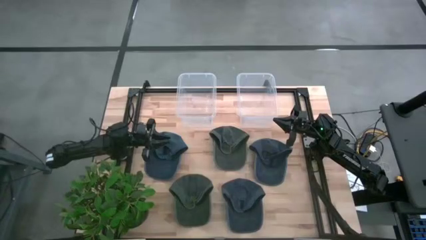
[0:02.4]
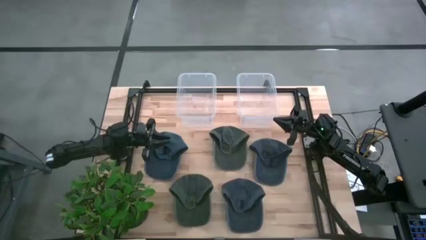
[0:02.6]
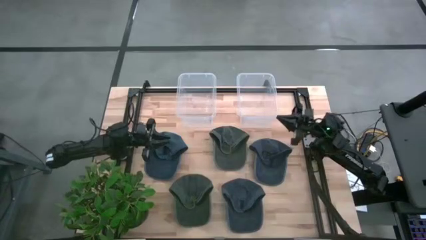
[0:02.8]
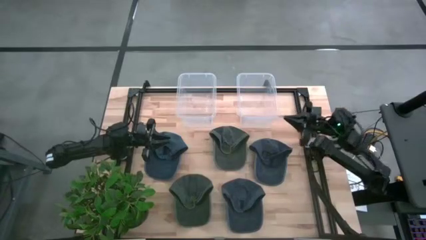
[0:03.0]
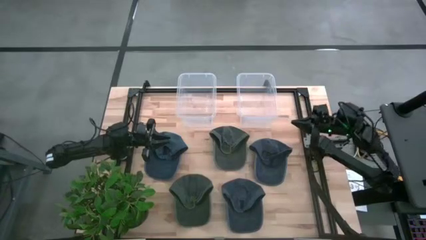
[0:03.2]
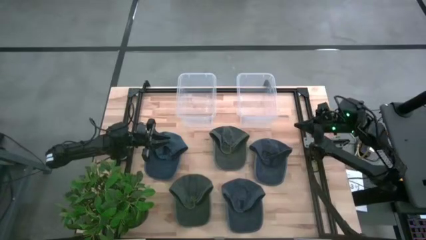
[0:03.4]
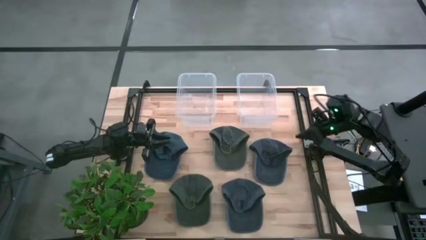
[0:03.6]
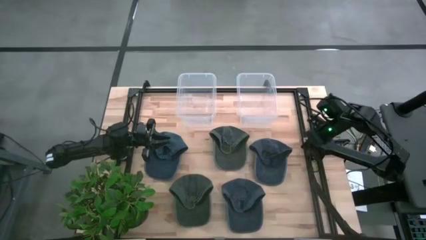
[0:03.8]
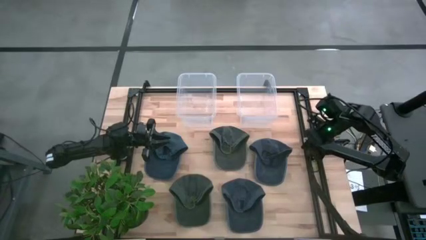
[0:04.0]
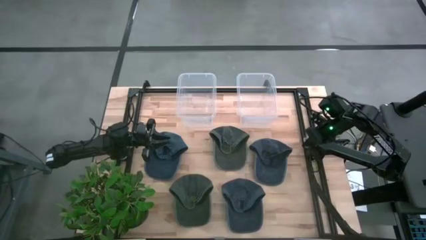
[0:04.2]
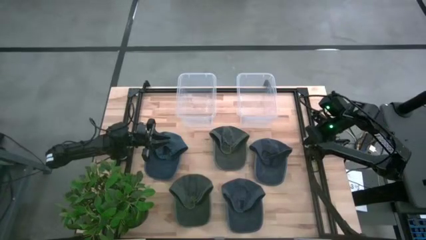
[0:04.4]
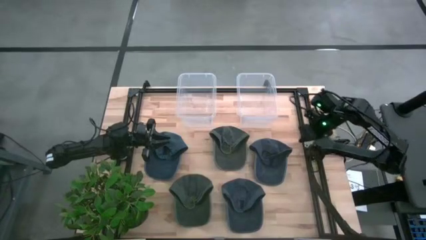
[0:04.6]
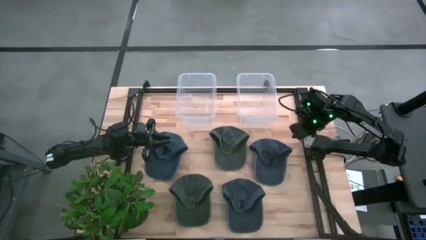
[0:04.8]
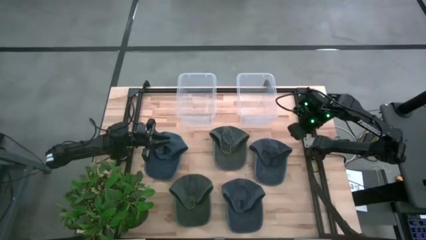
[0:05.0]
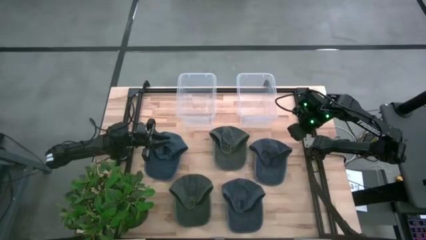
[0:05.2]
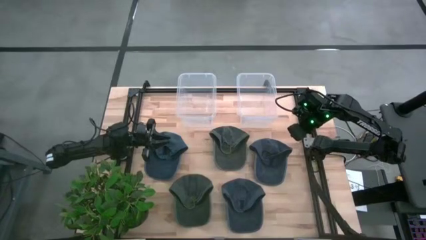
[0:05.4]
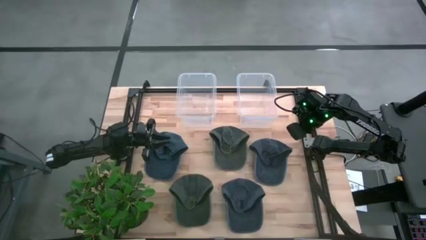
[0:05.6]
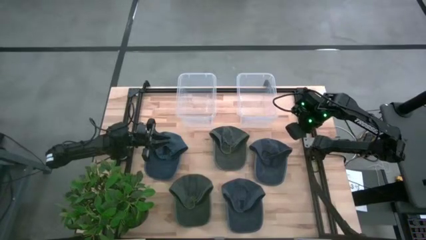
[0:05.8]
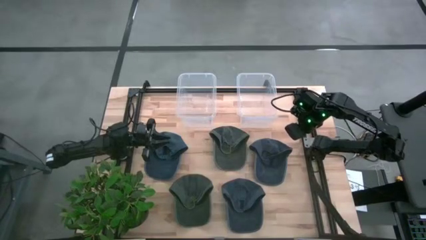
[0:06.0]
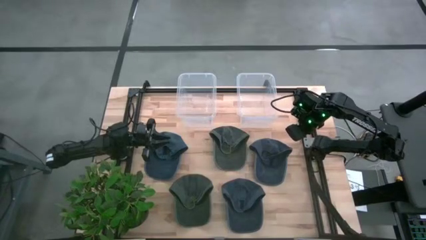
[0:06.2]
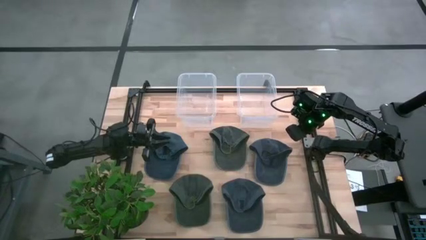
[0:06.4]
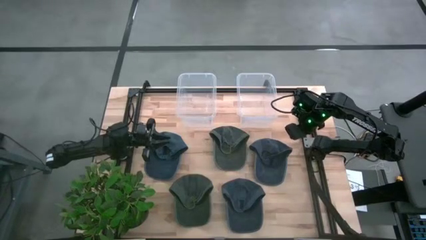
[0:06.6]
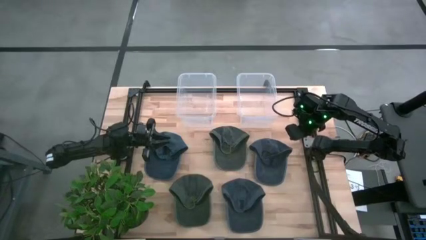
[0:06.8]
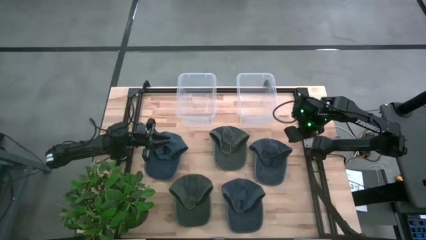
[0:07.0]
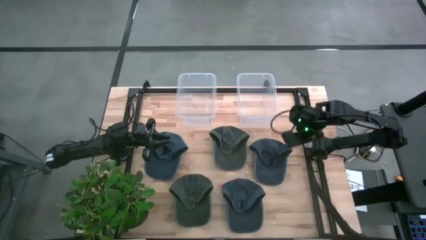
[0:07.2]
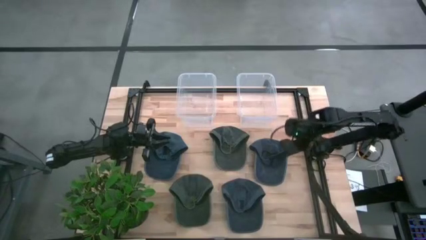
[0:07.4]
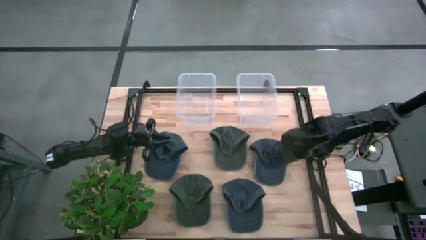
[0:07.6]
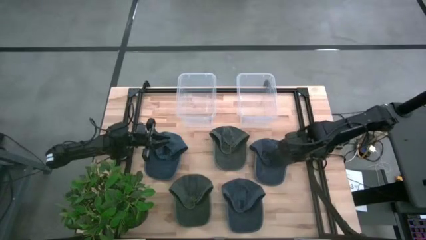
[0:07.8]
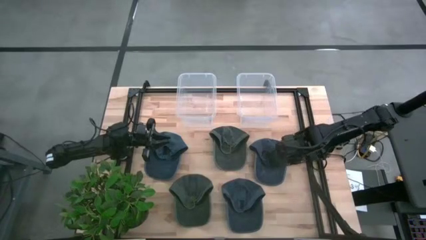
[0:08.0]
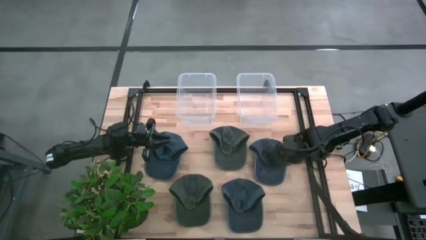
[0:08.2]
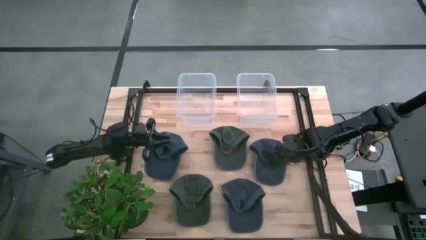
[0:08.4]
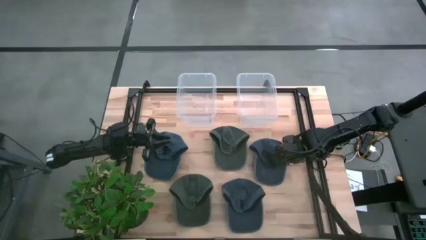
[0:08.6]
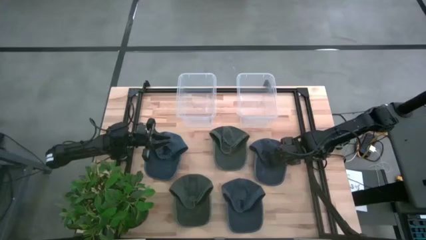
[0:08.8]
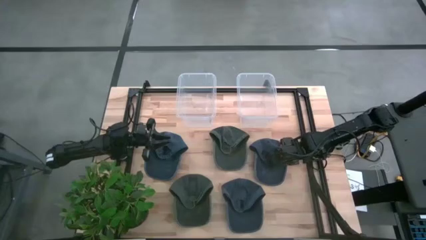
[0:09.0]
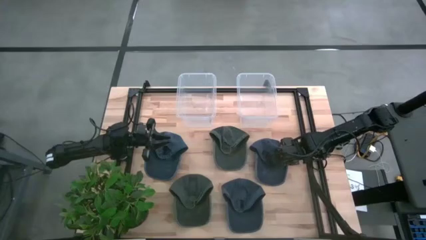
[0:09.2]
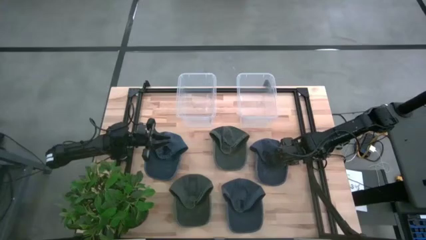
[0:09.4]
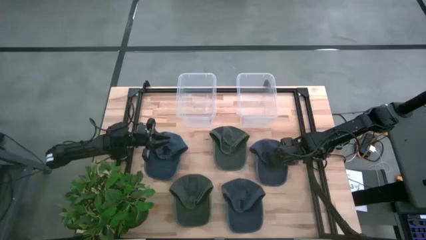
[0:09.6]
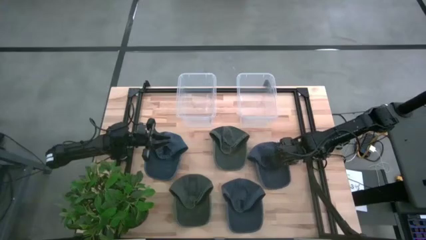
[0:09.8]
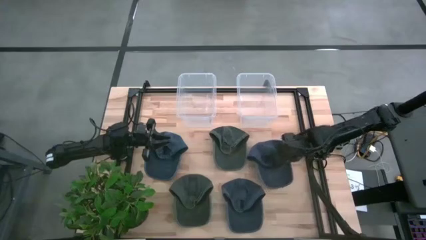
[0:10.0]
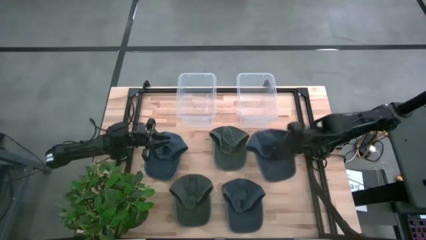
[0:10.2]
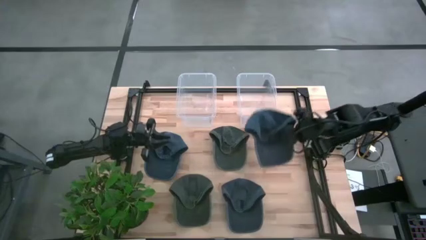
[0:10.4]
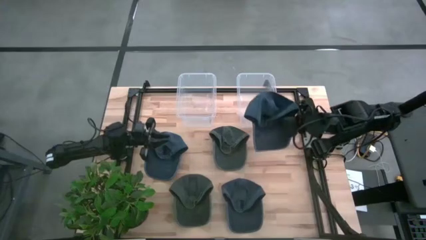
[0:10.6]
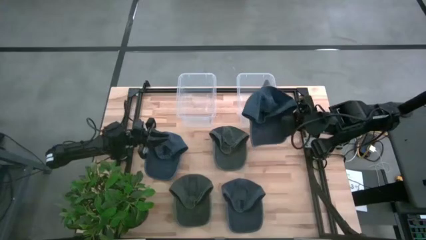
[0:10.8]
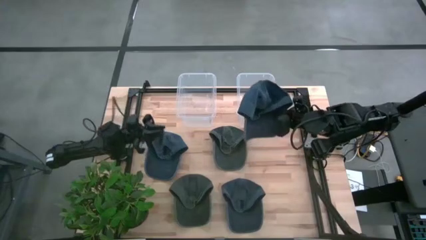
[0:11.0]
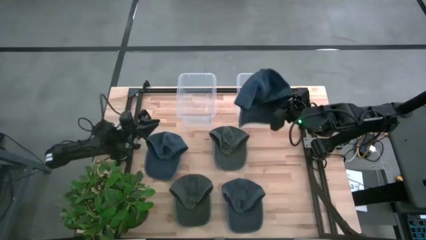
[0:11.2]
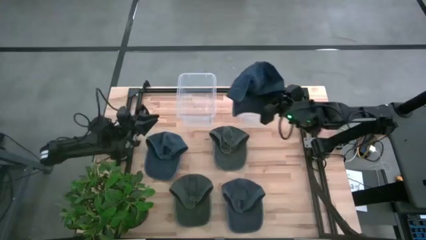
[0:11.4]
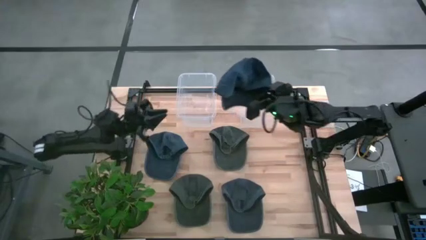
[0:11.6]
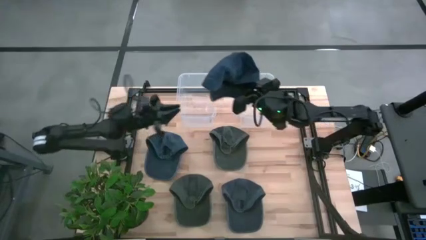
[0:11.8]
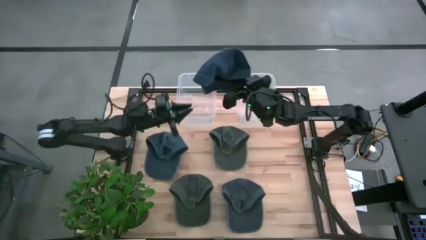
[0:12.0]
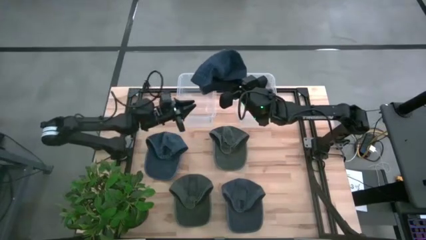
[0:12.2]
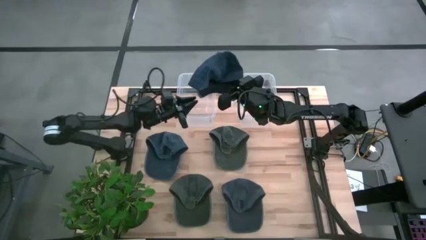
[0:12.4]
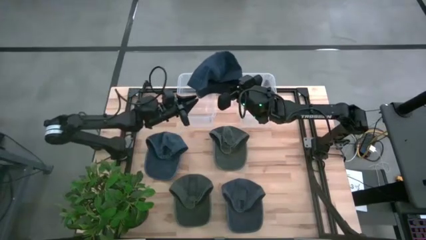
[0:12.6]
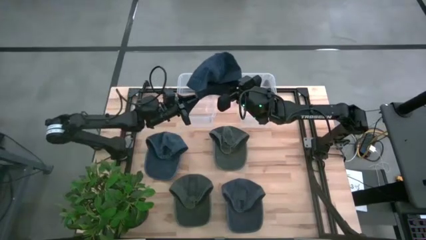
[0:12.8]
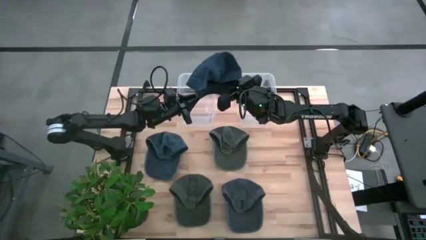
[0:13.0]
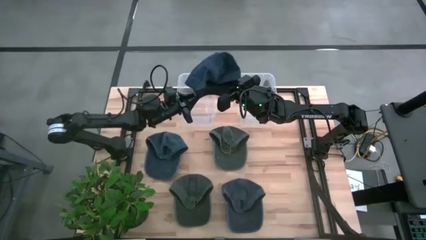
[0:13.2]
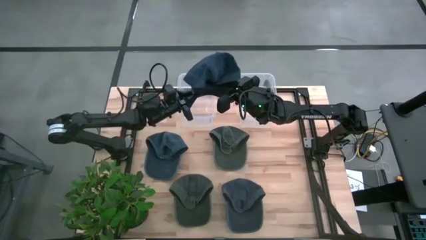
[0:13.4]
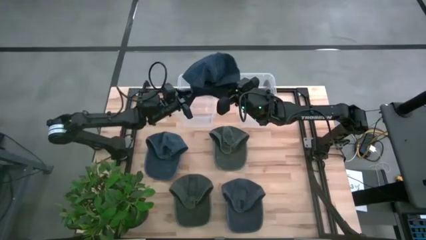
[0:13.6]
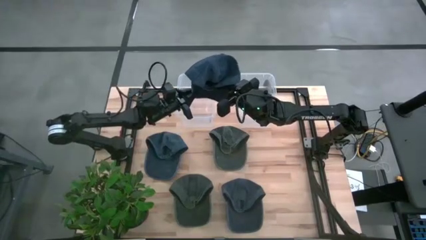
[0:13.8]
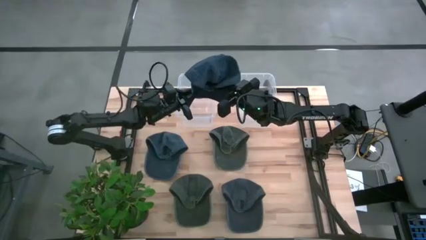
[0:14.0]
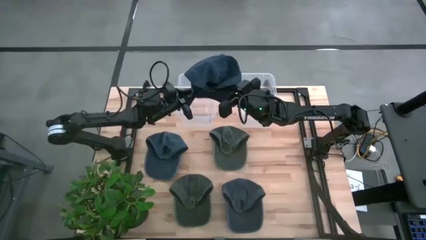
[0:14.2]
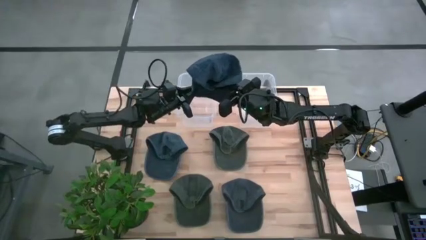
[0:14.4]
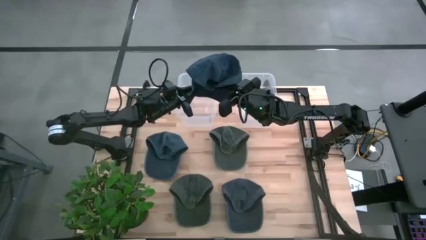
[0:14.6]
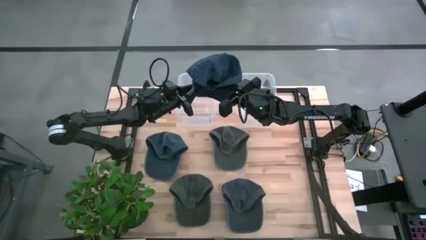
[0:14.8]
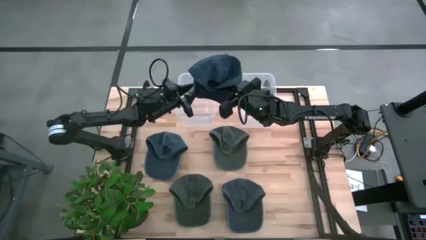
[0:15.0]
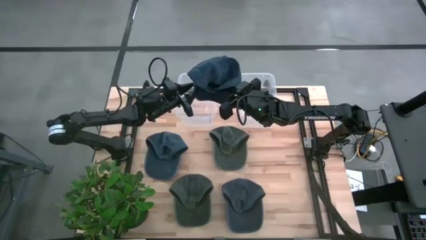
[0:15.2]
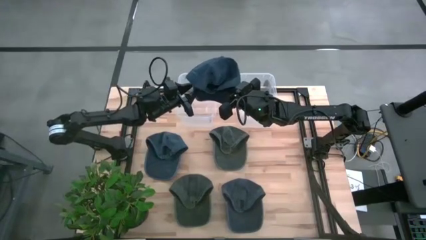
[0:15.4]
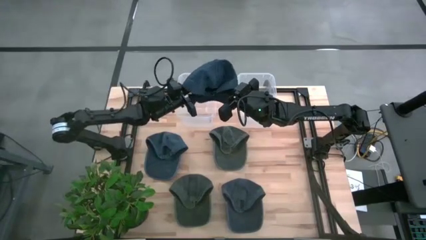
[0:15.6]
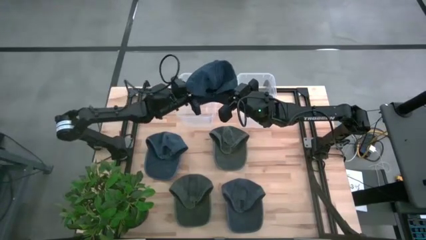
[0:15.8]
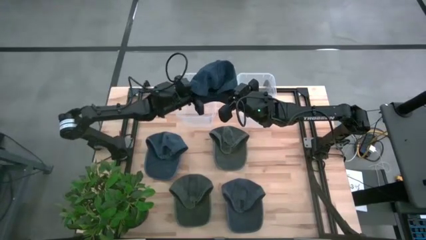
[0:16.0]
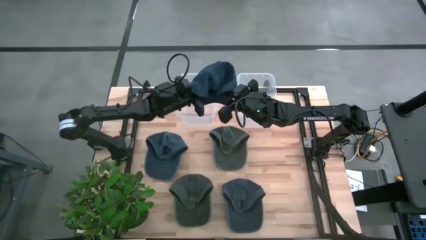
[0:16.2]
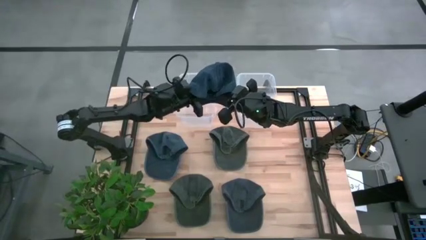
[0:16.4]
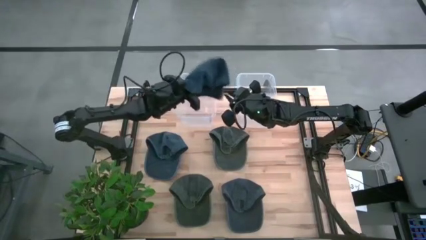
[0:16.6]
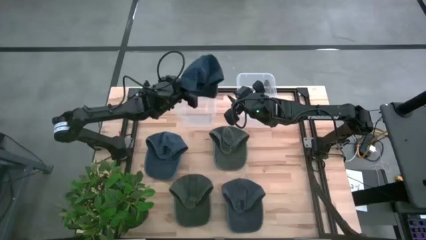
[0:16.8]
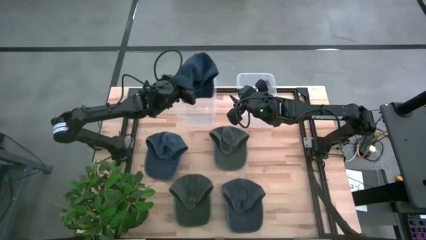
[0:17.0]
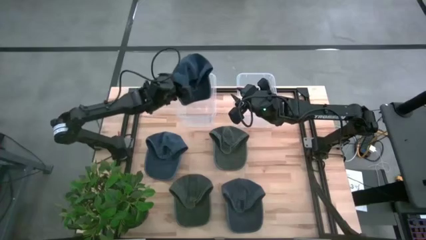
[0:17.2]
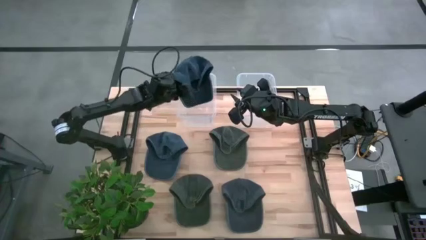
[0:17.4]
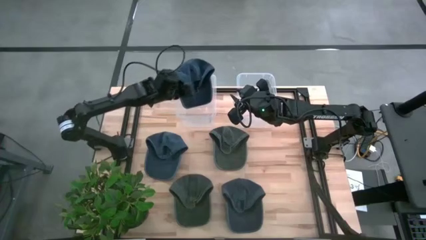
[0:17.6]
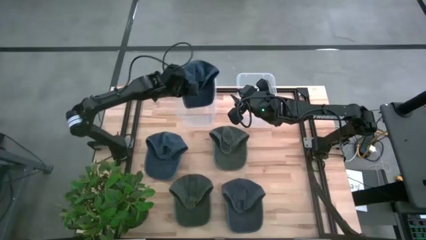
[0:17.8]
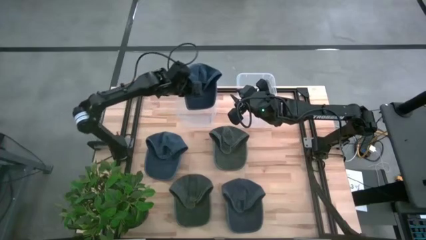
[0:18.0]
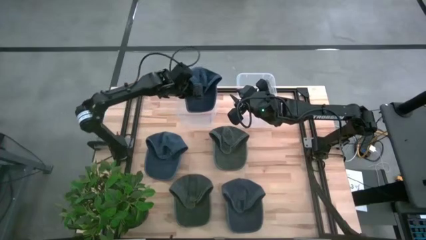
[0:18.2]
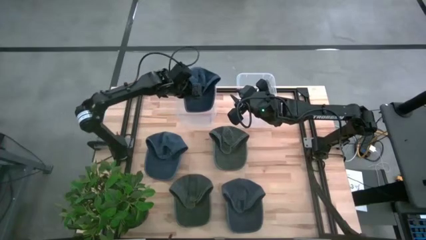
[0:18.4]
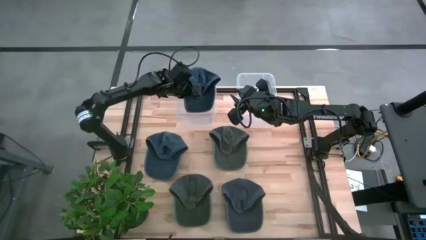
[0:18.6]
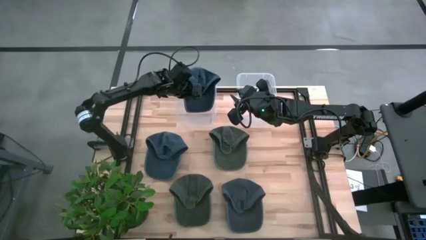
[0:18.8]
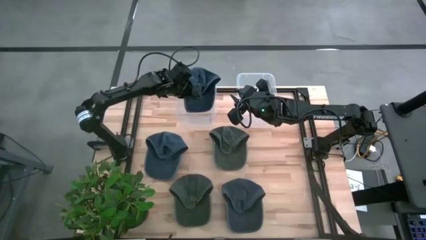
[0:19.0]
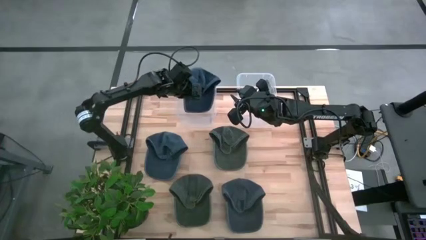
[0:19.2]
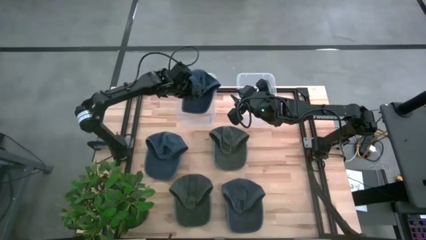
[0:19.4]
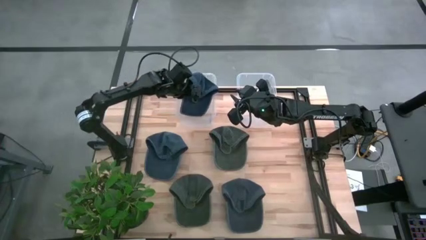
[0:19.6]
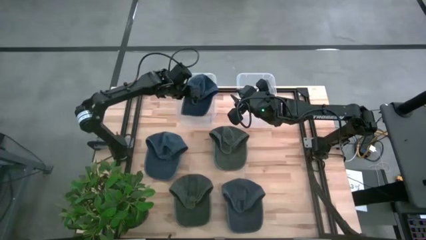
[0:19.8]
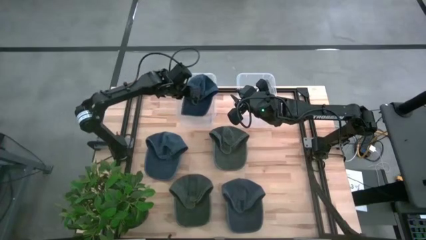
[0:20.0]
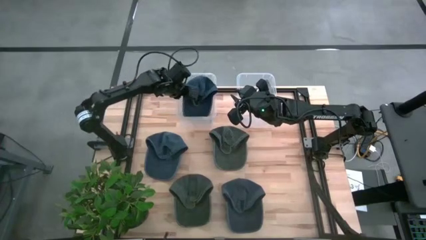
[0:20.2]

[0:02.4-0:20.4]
Task: Pick & Place hat
Put the top right blue cap into the left transparent bin
